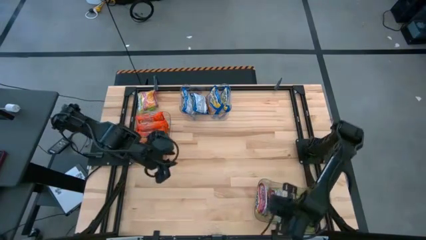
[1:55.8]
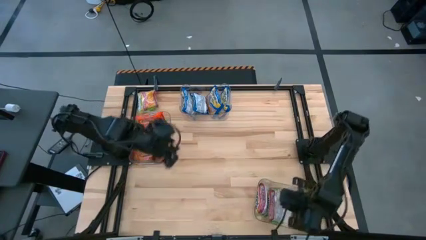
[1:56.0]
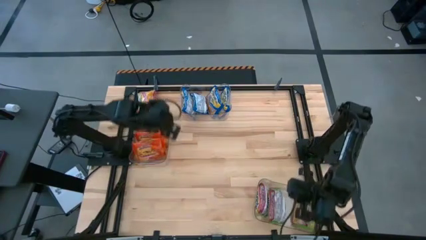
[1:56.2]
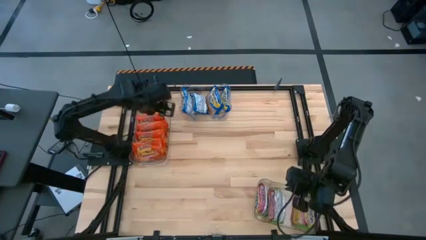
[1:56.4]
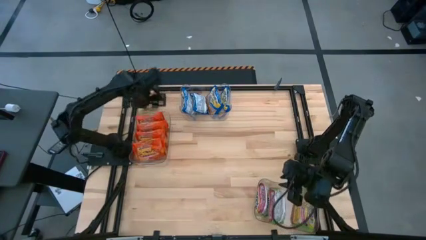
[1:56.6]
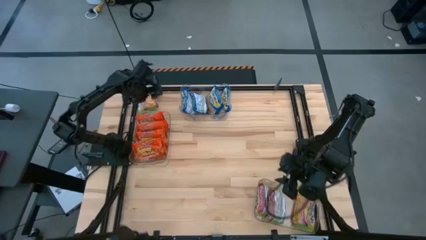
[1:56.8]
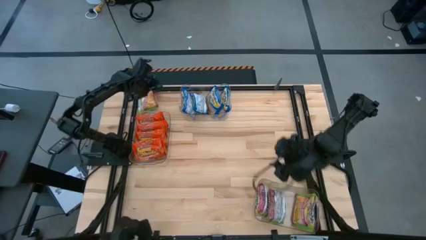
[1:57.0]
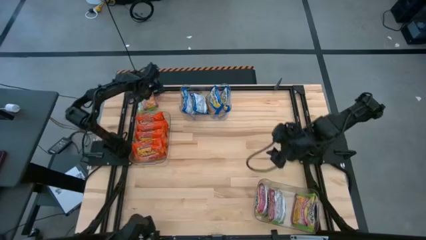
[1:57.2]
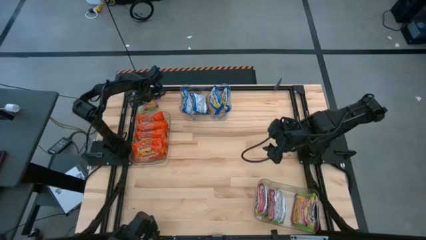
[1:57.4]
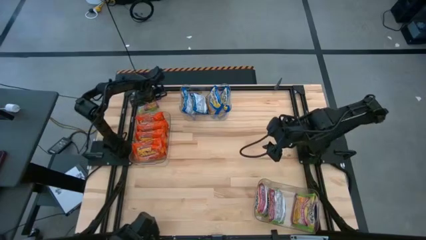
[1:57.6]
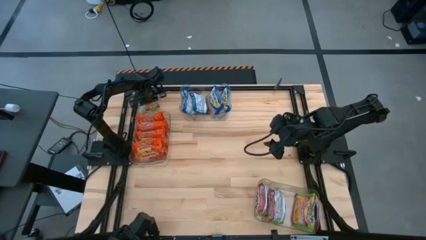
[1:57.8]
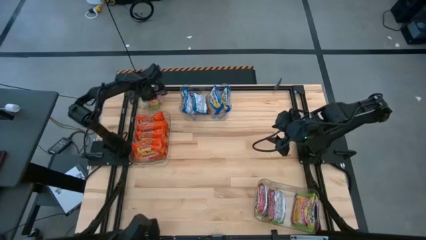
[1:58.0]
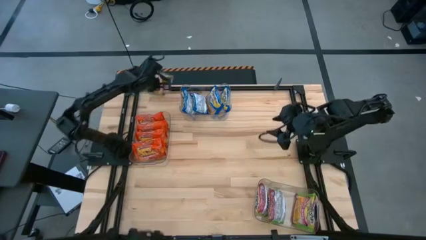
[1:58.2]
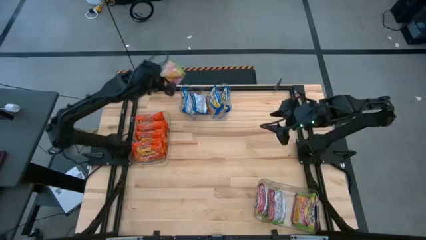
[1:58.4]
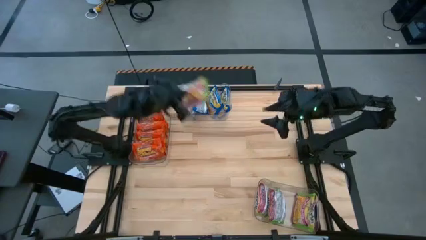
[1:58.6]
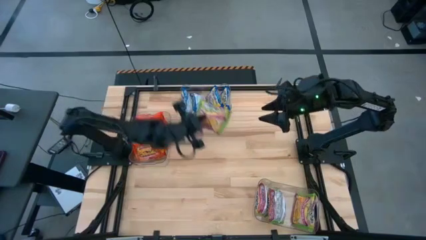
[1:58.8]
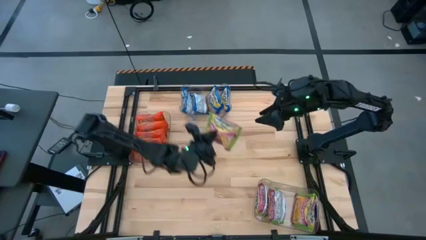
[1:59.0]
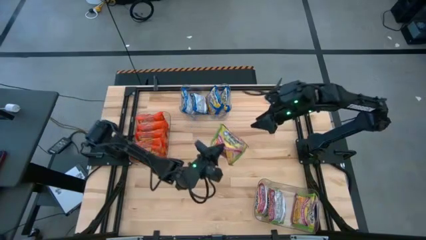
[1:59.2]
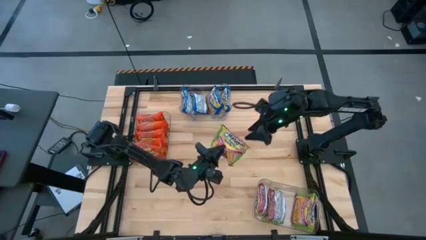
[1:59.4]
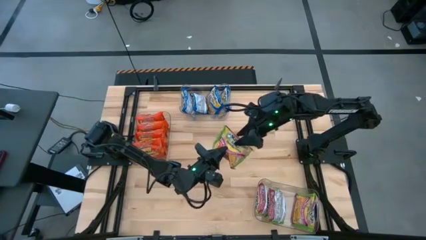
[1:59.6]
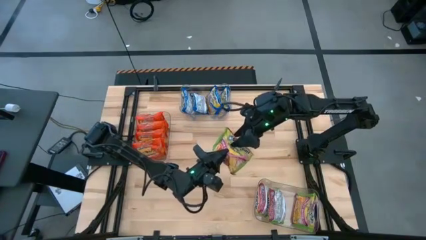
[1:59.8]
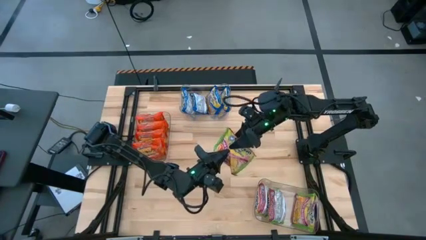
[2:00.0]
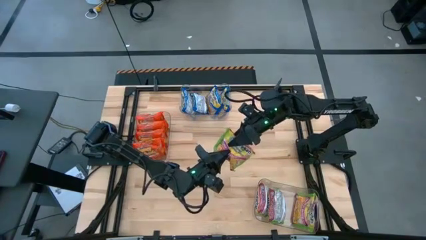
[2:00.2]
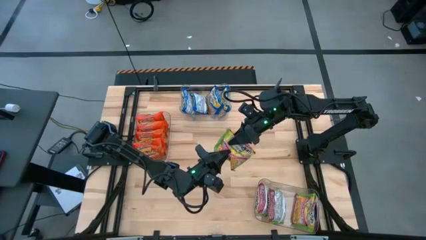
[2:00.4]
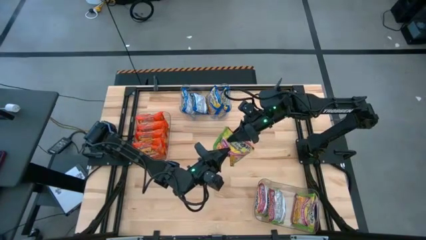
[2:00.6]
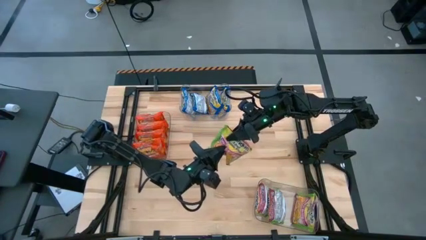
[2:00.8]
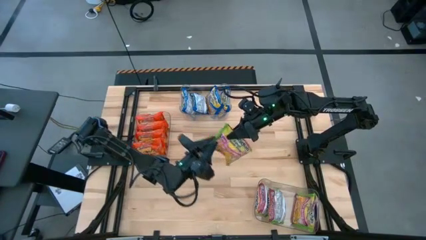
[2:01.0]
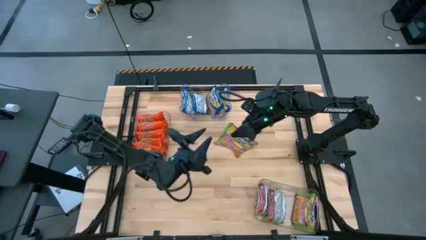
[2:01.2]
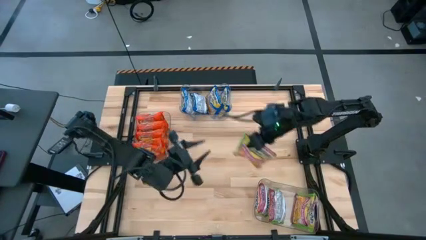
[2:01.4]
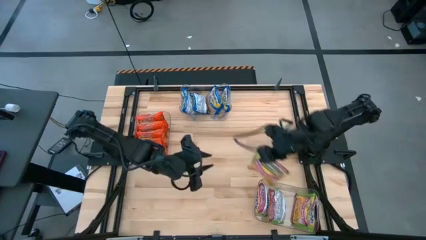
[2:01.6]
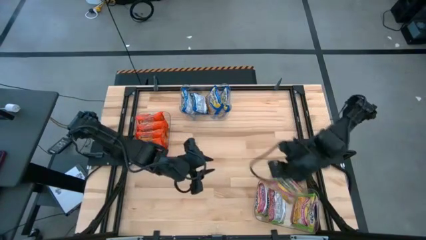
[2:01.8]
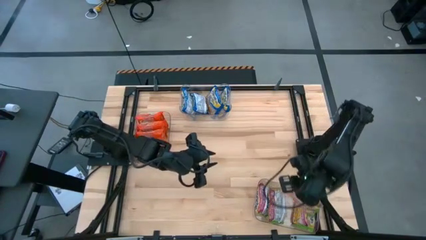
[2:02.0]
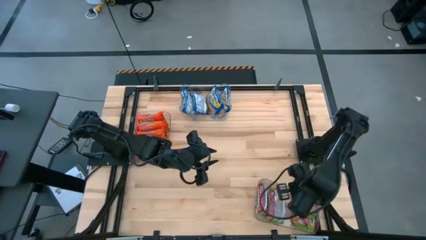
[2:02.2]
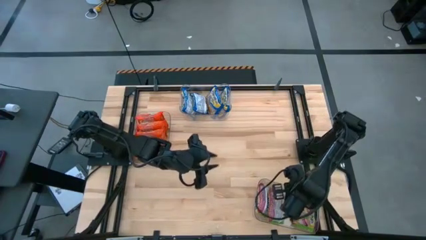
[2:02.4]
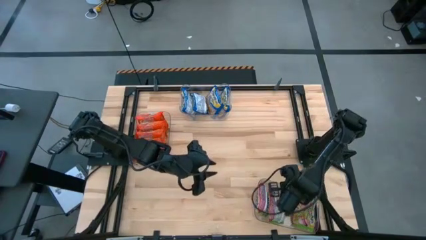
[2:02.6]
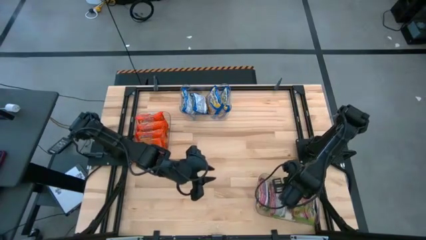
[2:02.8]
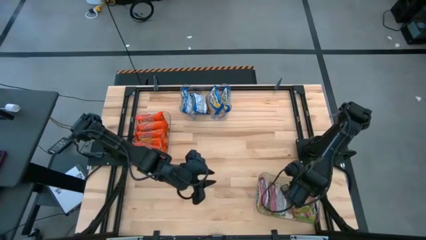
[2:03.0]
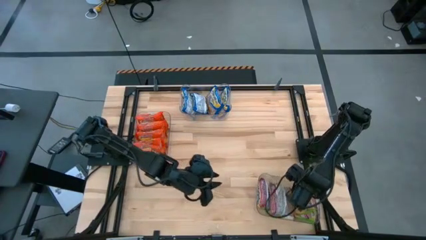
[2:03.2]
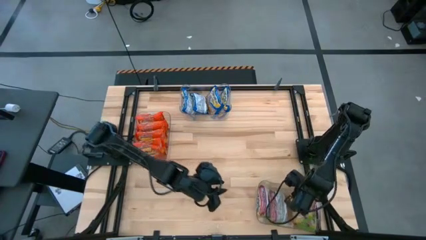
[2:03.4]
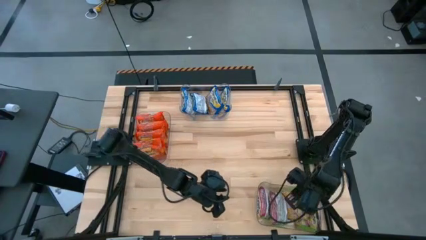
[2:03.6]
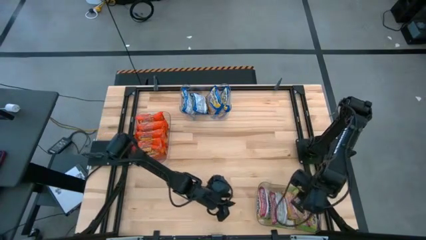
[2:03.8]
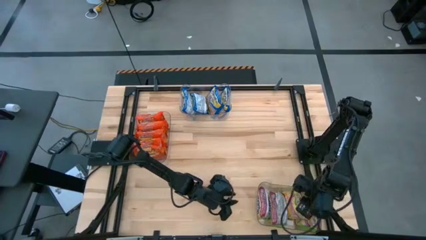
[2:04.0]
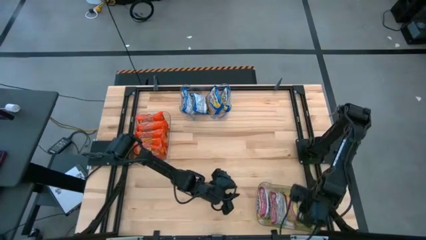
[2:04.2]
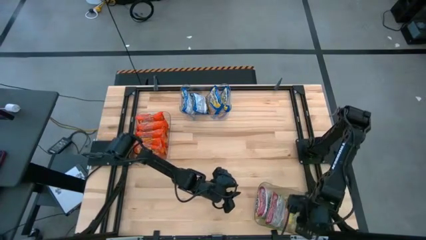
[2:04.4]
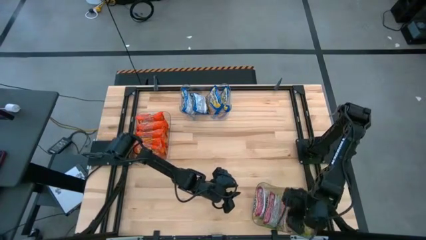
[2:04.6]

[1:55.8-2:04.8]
Task: Sort Maruchan noodles
Put the green noodles into the right transparent bin

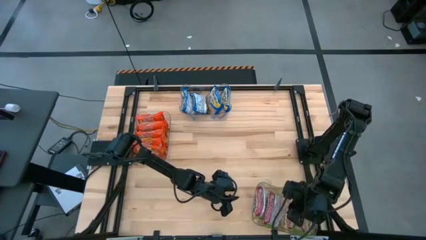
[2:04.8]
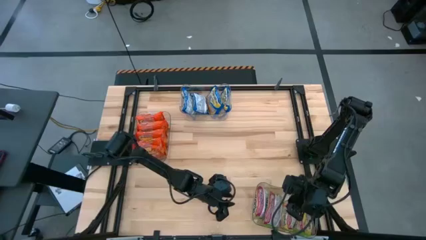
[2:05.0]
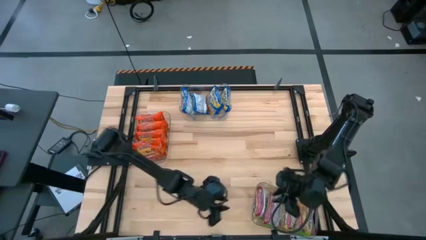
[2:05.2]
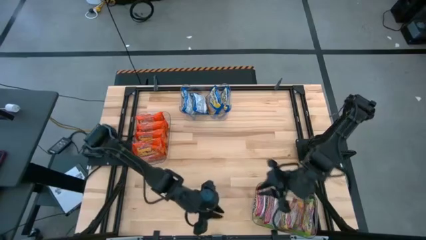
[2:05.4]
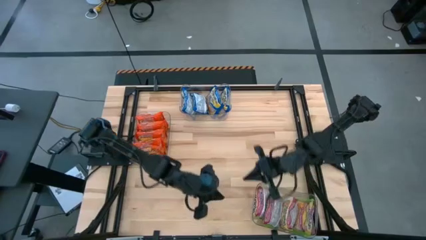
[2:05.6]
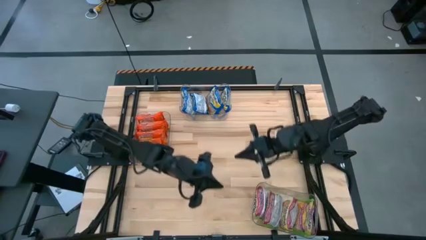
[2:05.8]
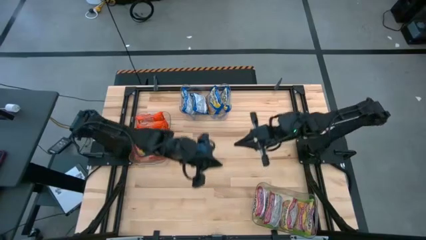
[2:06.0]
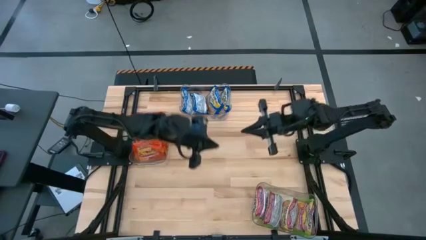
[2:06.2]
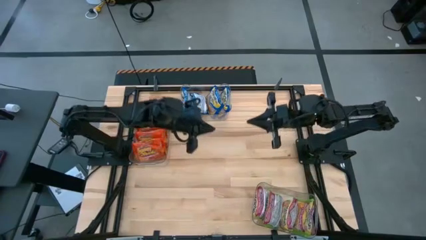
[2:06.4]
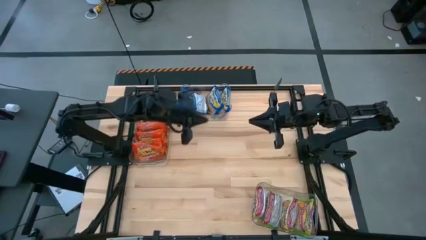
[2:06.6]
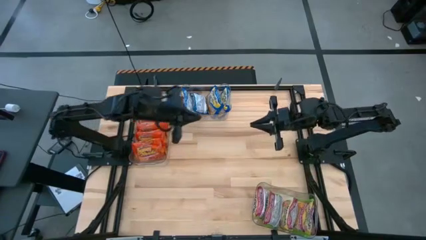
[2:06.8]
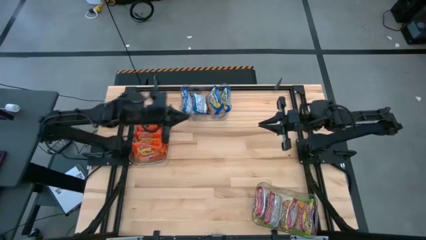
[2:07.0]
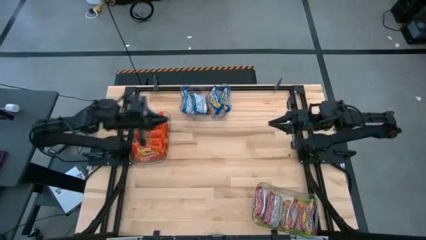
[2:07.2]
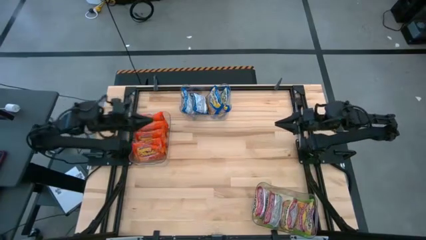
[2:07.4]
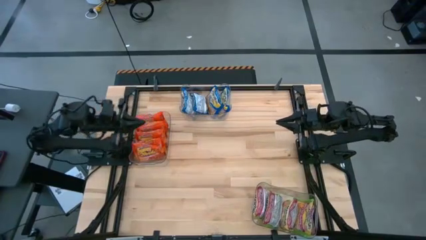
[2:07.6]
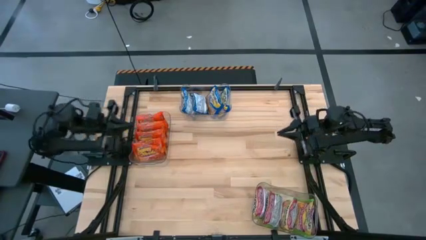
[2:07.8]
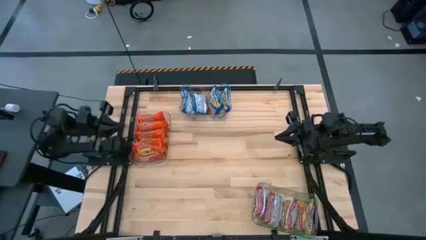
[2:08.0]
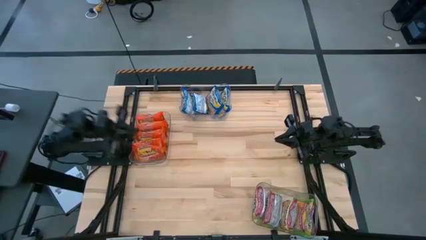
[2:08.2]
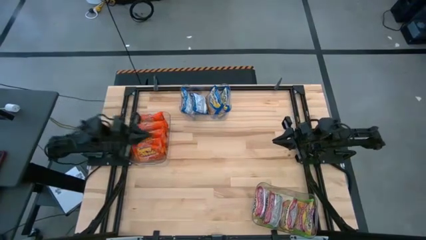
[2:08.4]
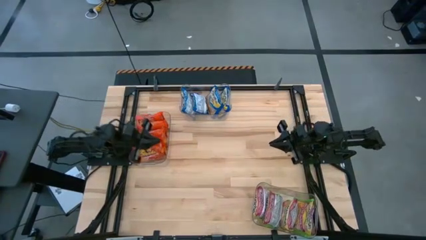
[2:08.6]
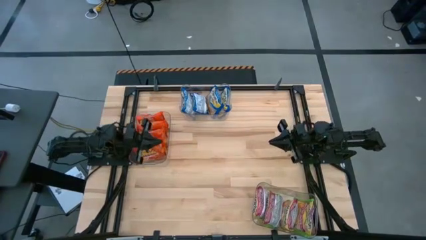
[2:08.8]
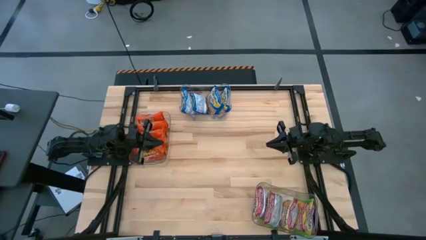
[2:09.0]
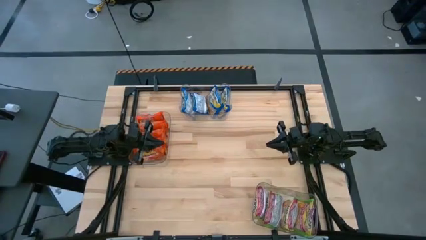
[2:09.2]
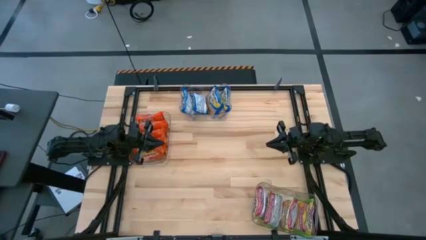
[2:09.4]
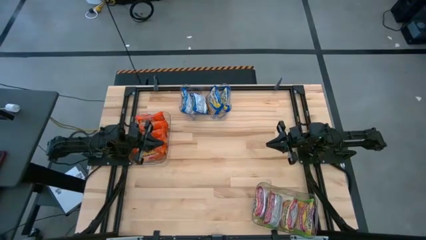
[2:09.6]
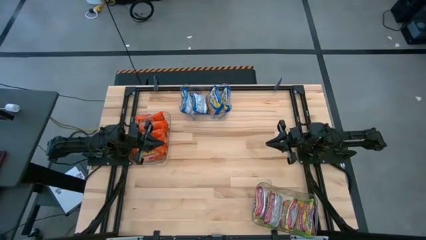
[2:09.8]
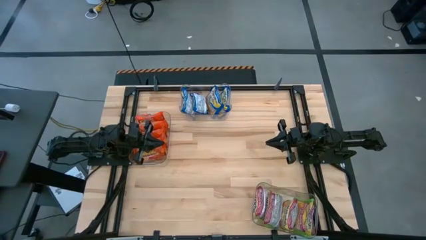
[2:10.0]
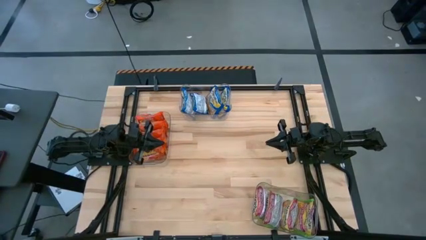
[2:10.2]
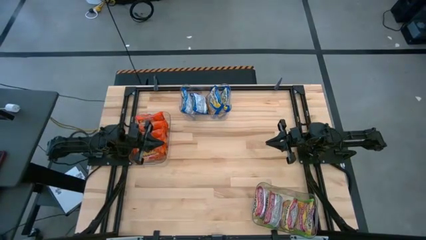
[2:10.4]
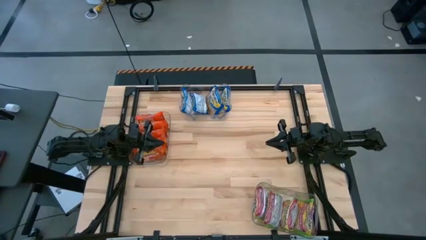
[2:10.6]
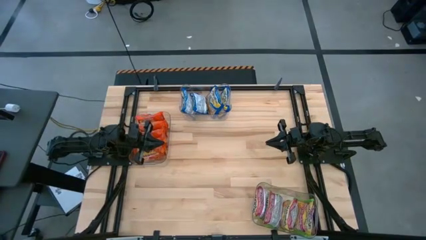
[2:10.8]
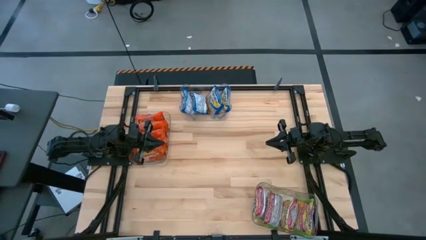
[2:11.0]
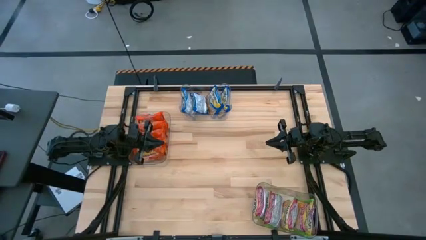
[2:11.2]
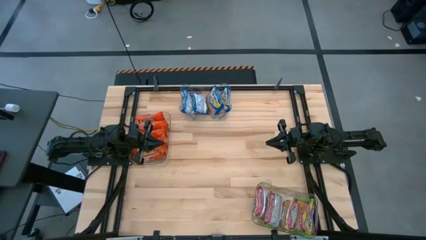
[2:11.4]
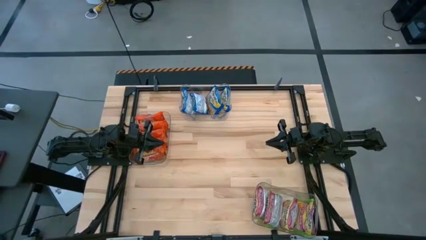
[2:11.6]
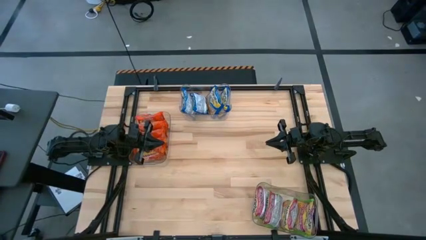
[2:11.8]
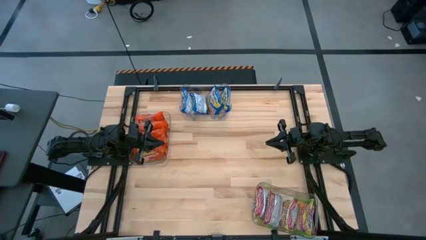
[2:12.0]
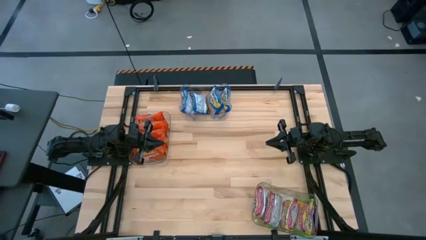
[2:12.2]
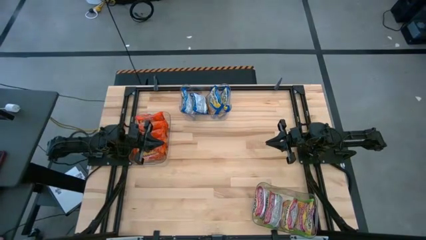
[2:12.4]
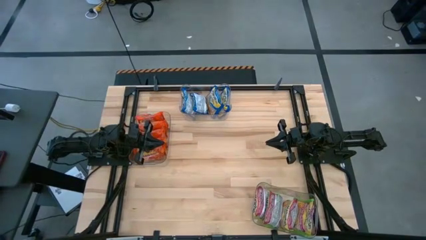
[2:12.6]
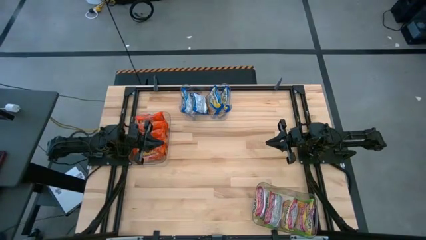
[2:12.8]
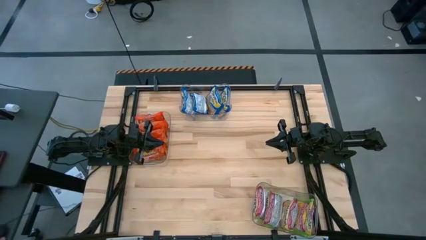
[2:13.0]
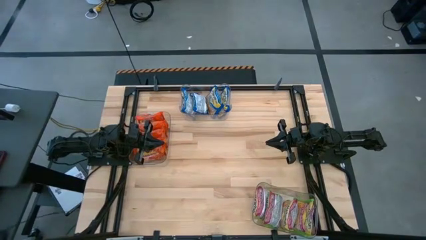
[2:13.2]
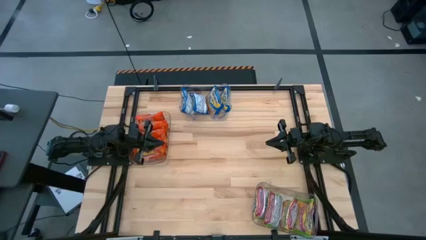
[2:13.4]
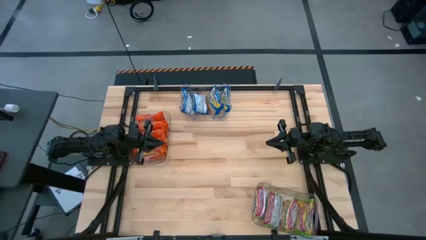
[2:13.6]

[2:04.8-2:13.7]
Return to Home Position
